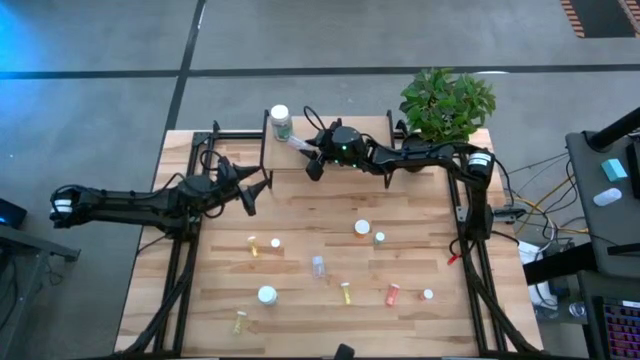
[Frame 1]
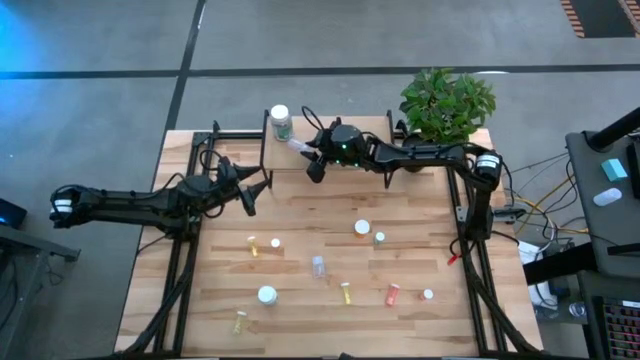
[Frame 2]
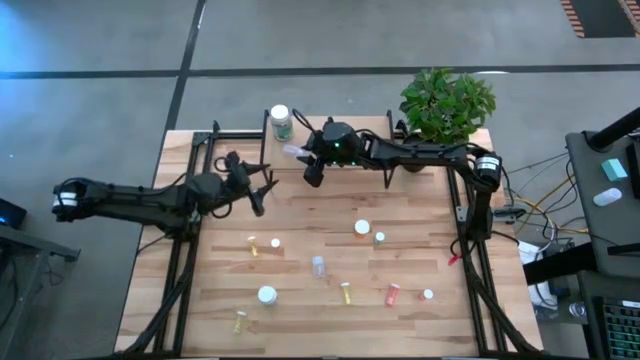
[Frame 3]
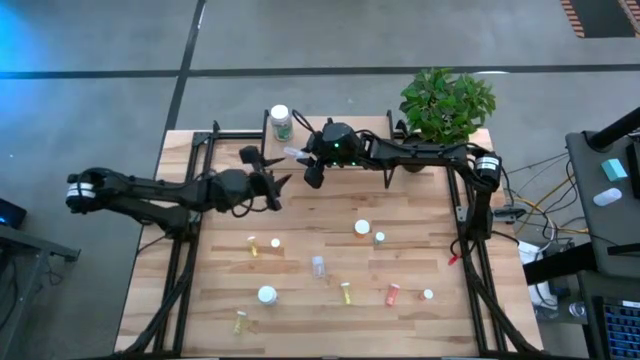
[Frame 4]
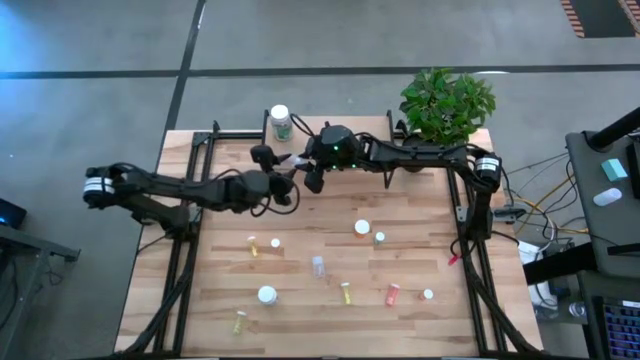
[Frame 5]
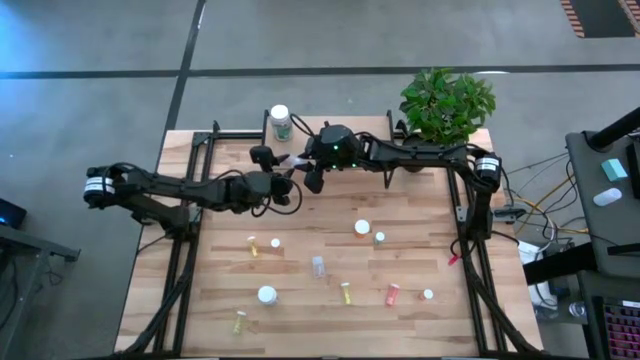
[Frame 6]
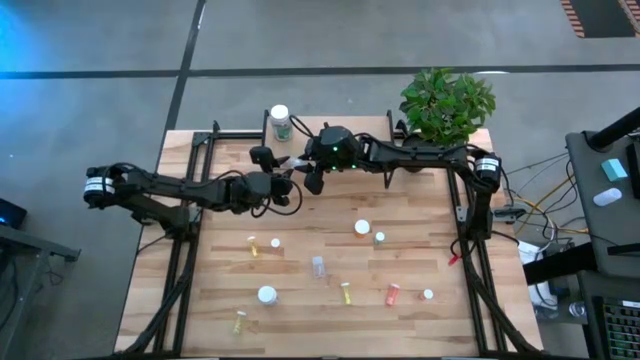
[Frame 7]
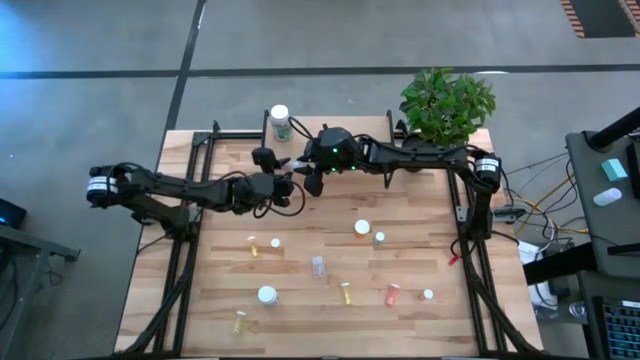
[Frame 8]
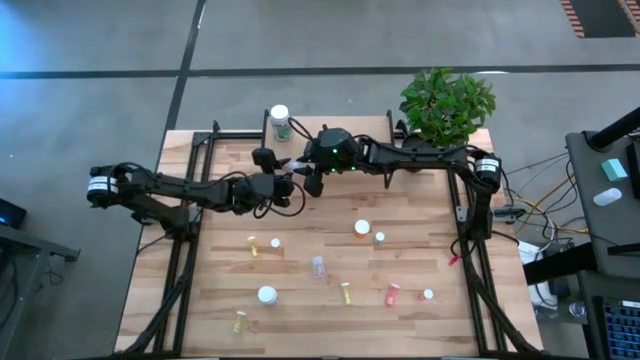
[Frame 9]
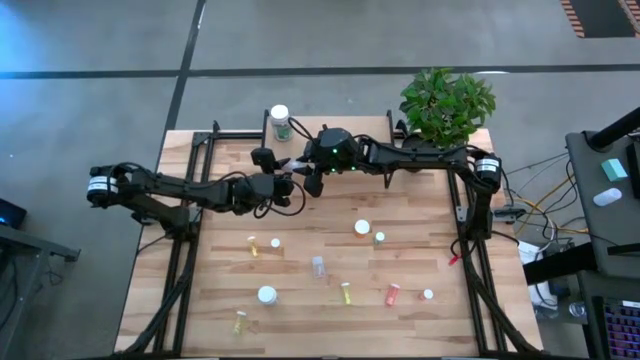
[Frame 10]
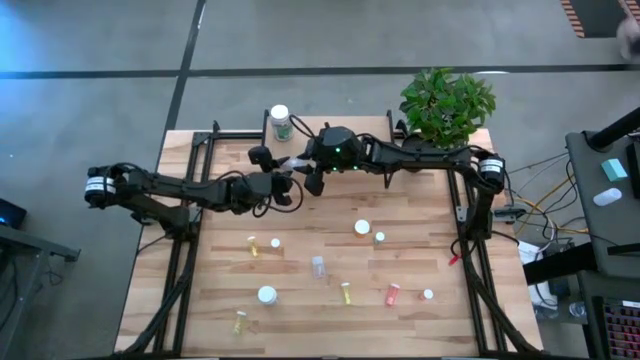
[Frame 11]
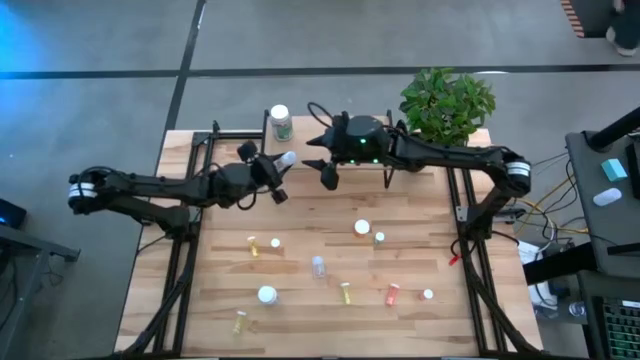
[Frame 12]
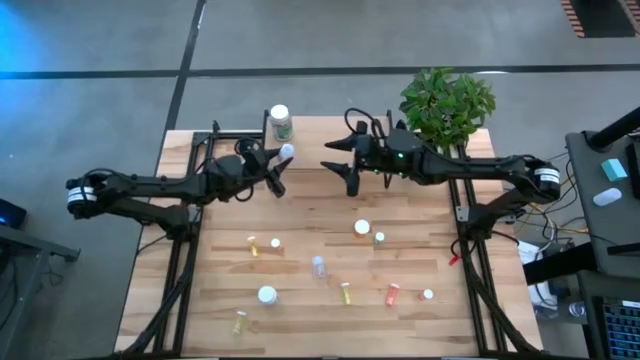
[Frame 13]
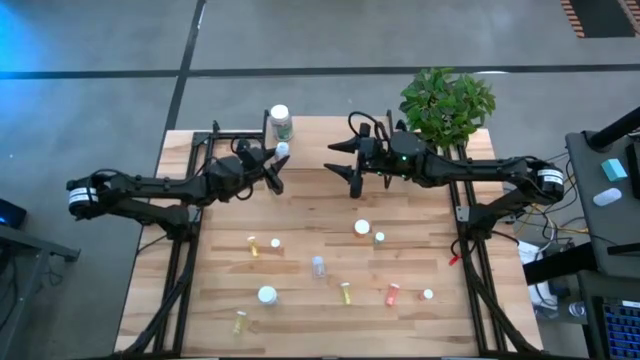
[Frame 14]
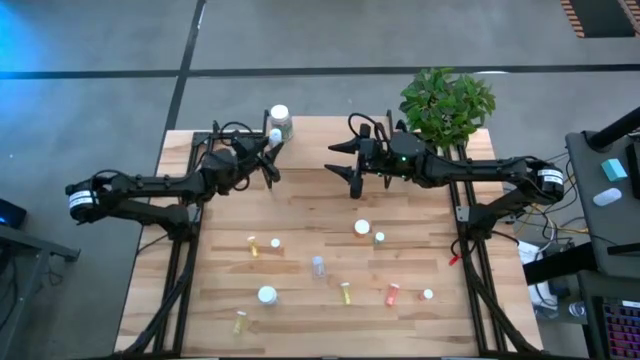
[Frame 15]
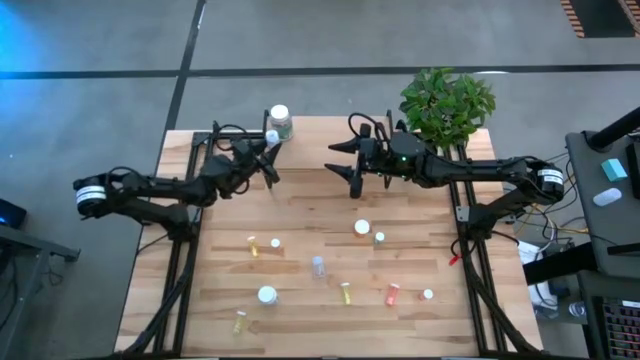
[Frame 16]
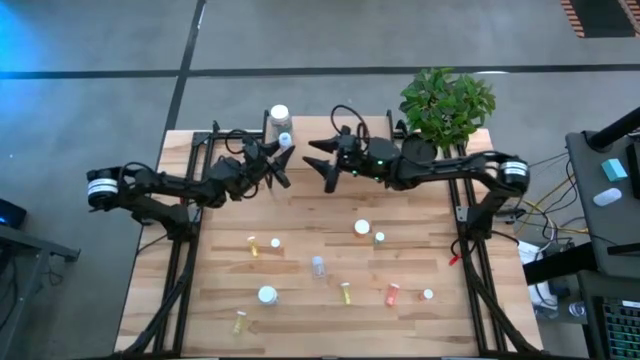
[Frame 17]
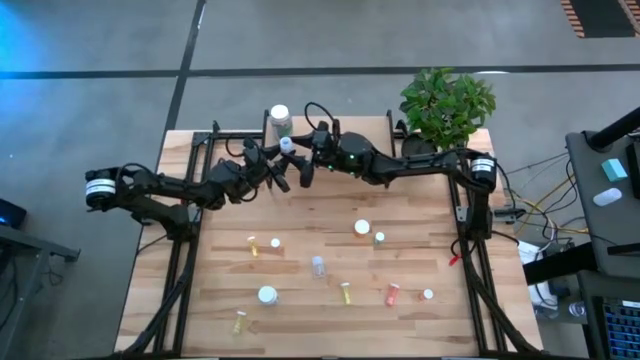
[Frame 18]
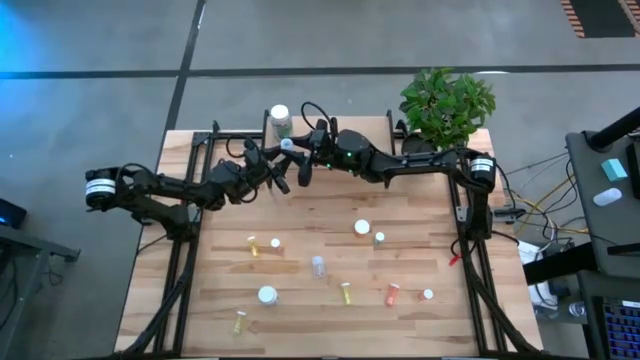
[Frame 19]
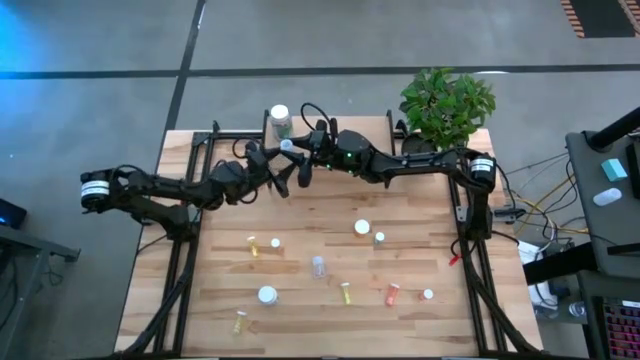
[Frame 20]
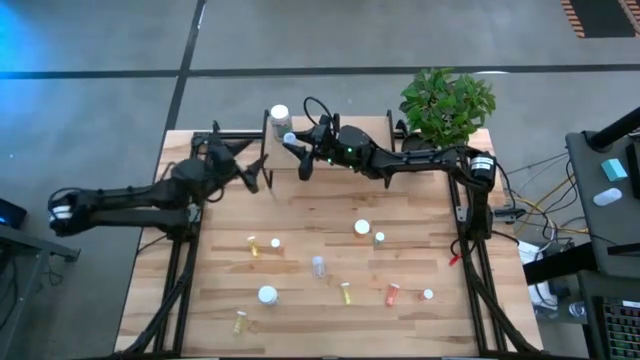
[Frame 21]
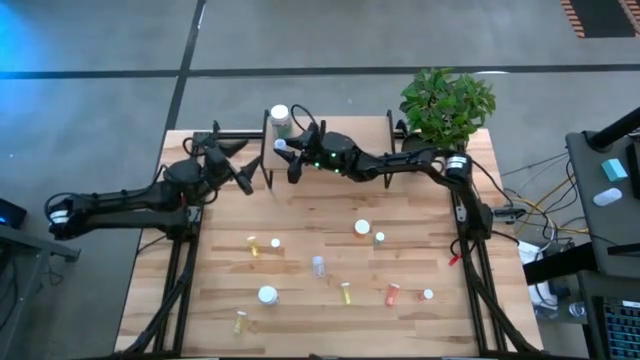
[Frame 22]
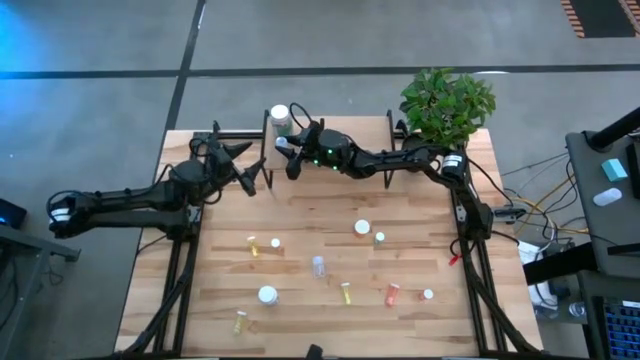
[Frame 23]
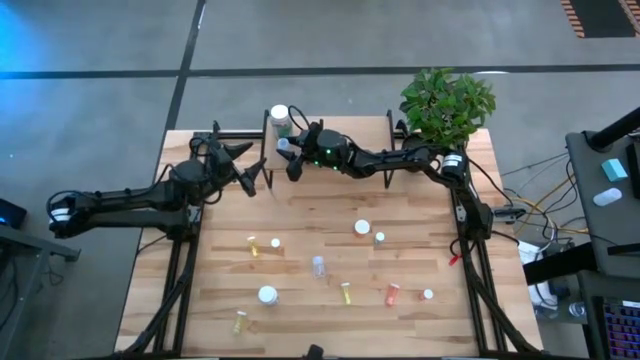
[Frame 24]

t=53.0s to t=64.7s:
Task: Pick and place medicine bottles onto shelf by color
Put the transparent pill bottle on the shelf

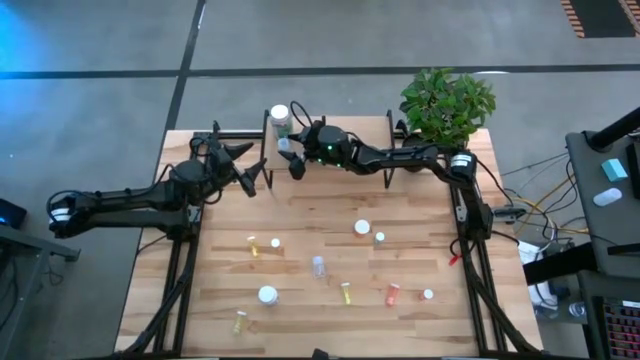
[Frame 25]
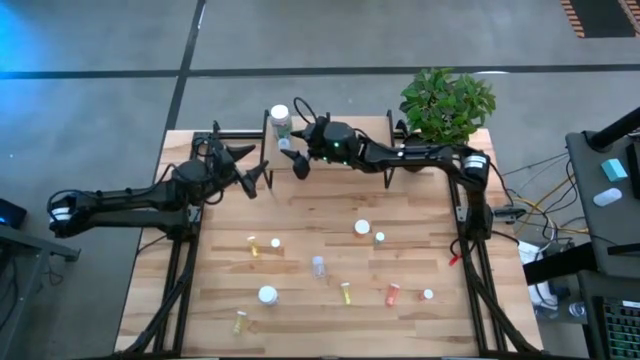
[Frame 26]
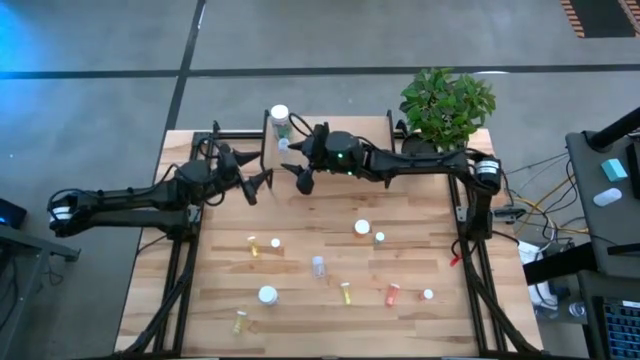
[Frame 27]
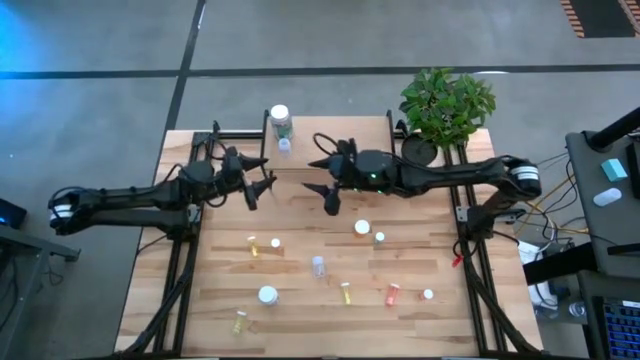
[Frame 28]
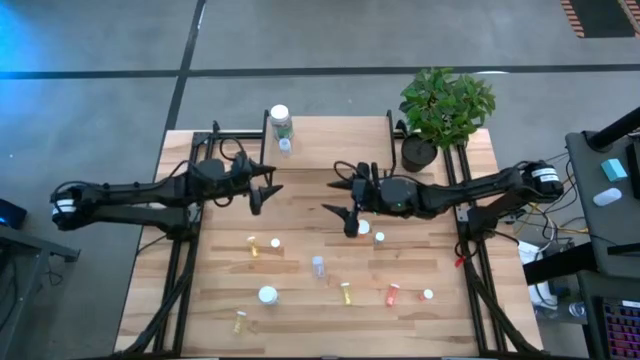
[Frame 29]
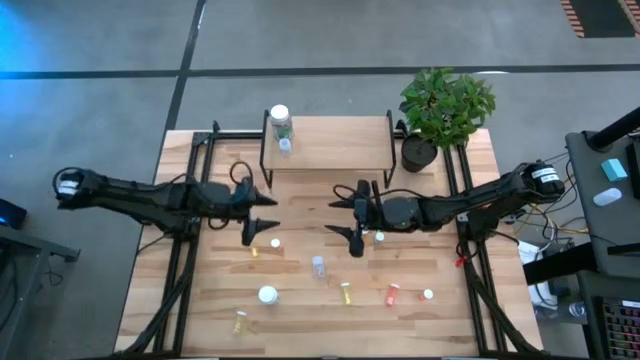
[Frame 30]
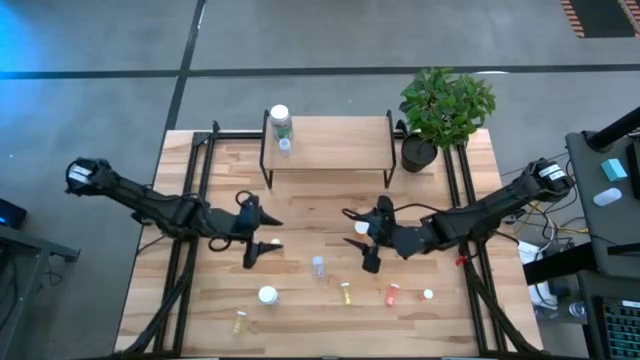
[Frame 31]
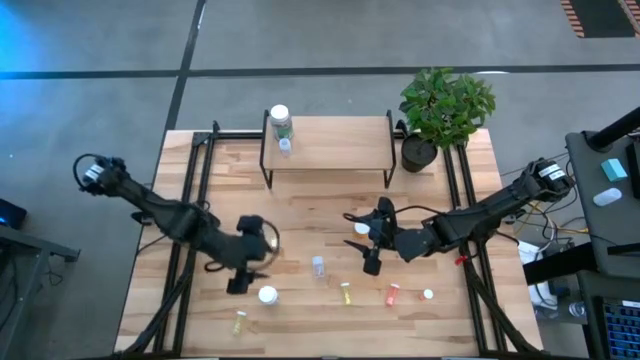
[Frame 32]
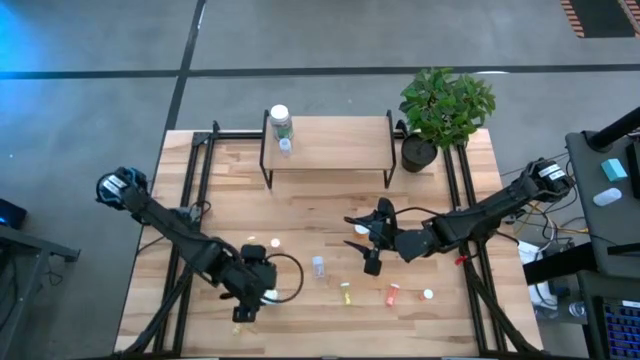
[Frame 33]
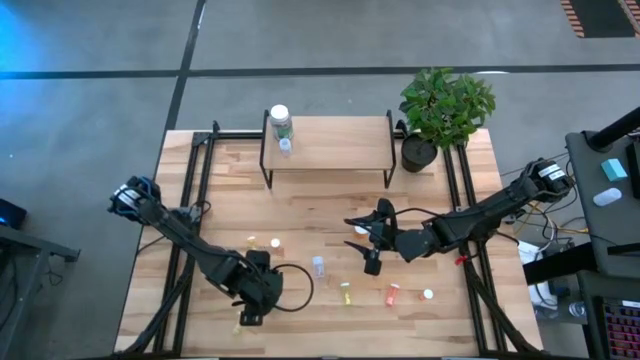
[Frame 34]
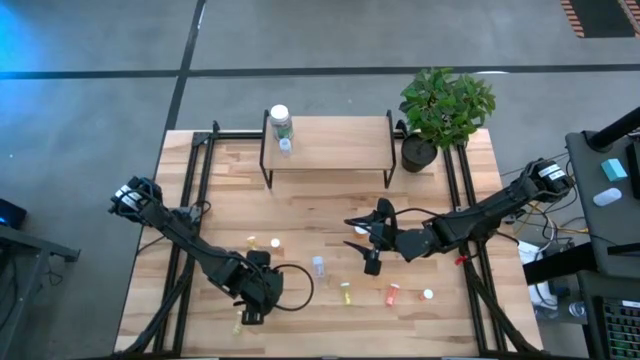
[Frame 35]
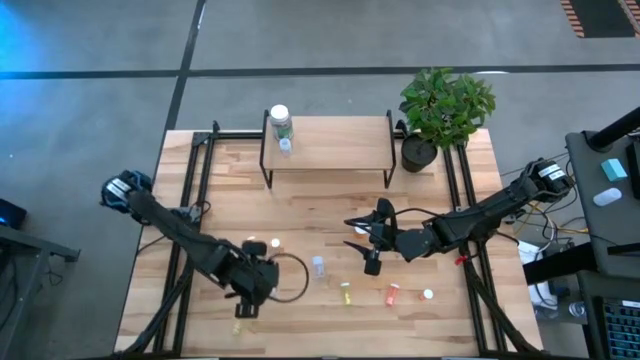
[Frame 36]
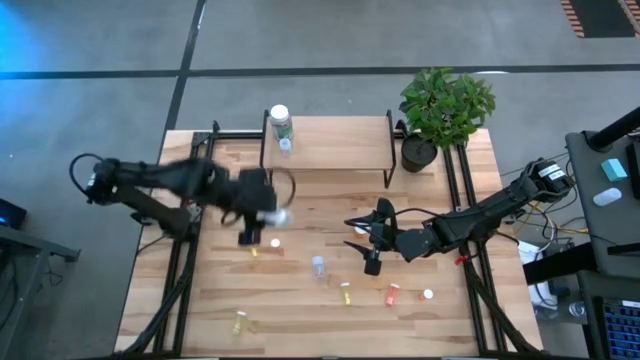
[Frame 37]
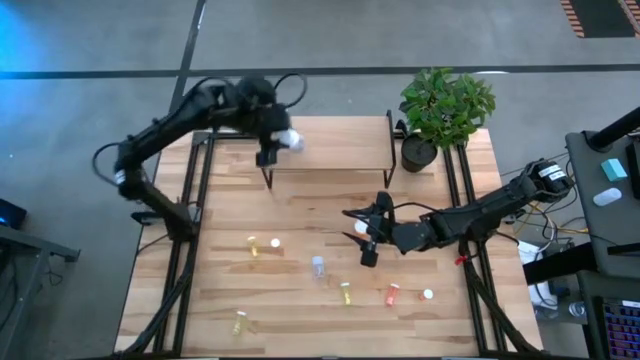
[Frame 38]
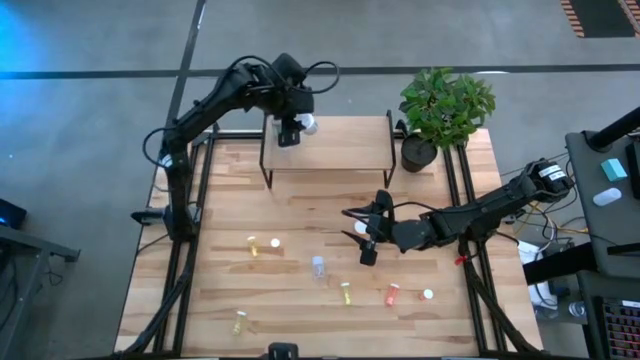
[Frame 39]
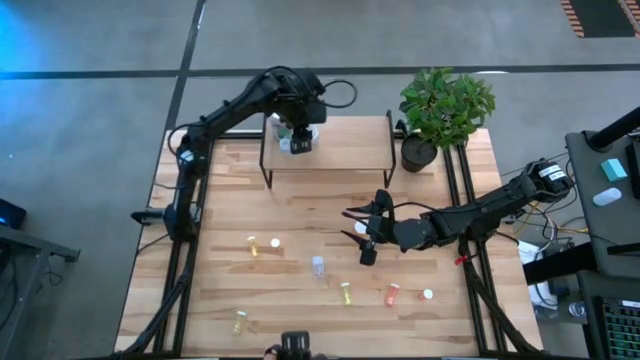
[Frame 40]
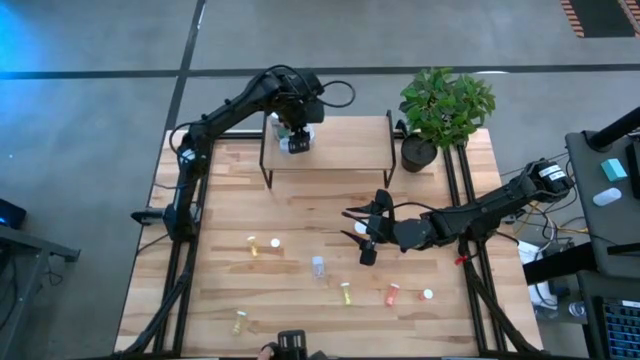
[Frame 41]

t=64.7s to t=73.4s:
Put the white pill bottle on the shelf

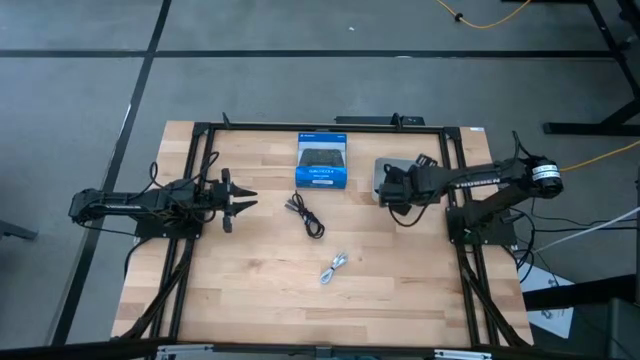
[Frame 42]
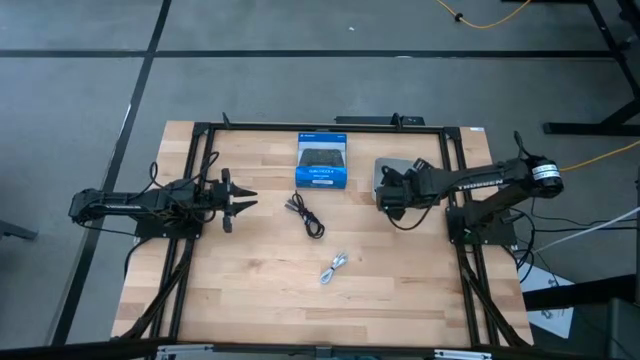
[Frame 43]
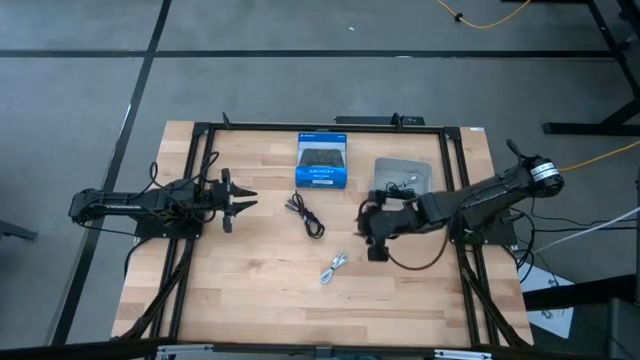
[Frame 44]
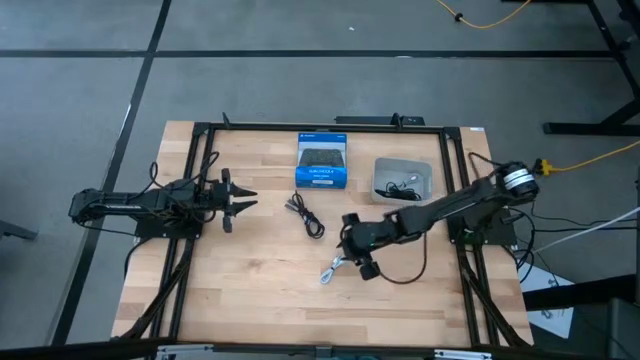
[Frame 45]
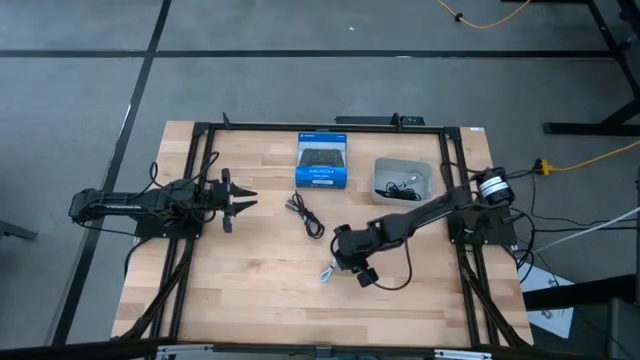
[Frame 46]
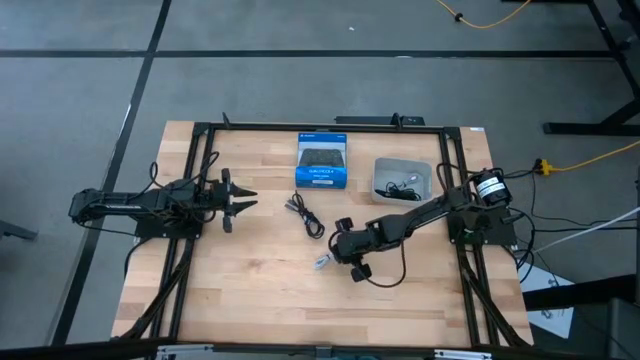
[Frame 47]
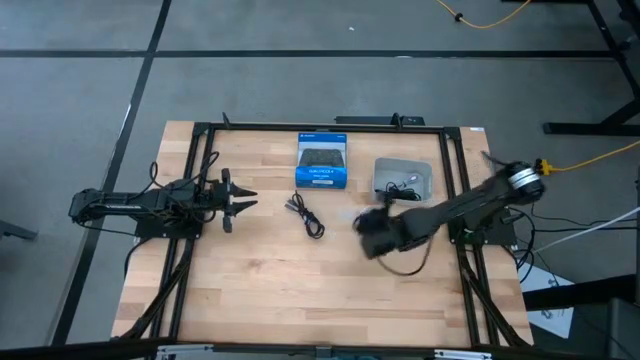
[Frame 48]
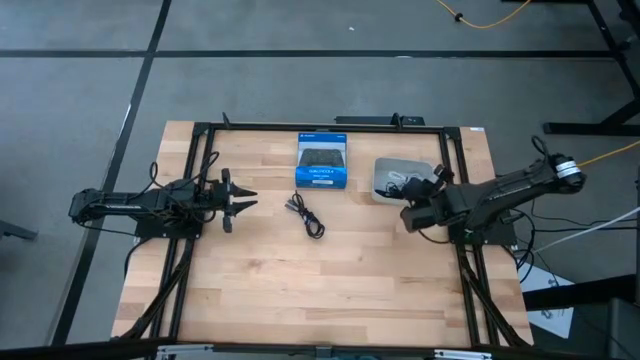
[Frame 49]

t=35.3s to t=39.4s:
Task: Pick and place USB-C Cables
Put the white charger cable into the gray bin
